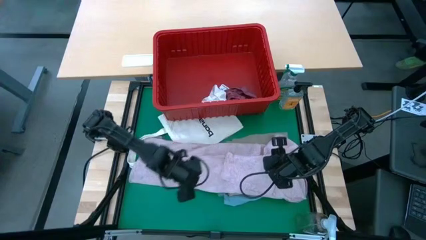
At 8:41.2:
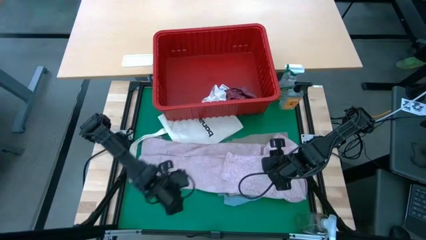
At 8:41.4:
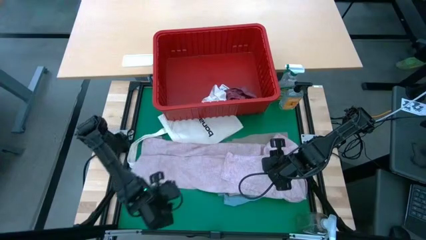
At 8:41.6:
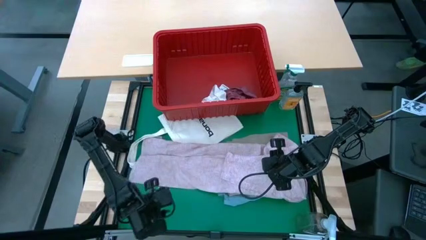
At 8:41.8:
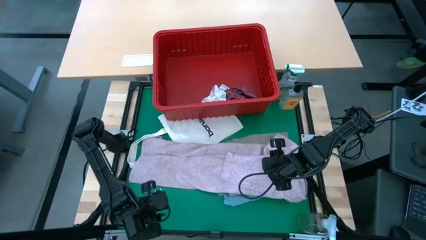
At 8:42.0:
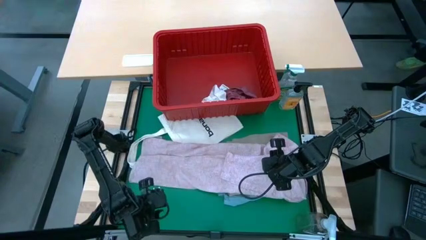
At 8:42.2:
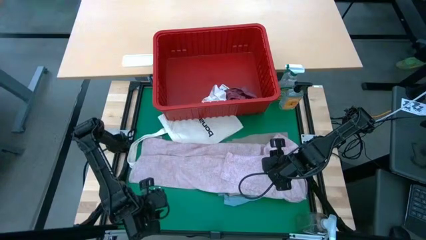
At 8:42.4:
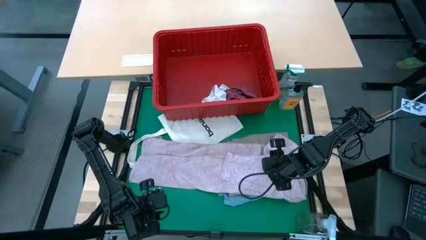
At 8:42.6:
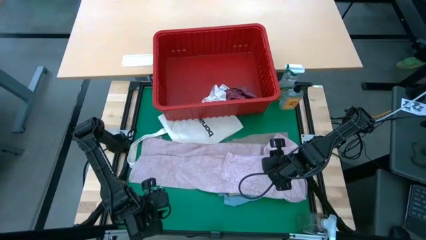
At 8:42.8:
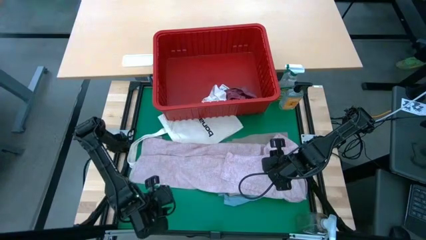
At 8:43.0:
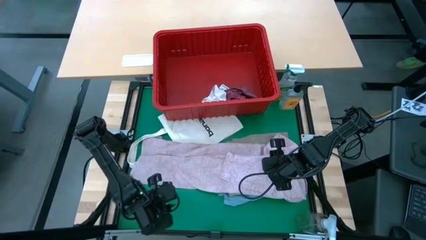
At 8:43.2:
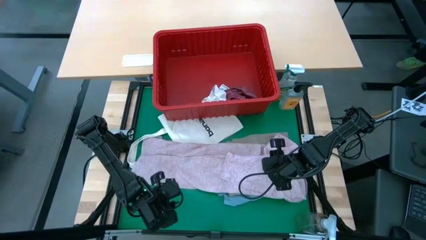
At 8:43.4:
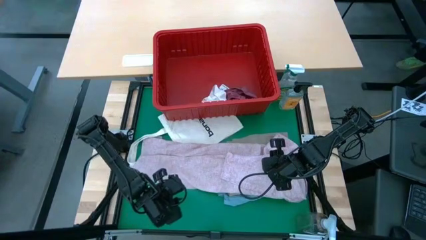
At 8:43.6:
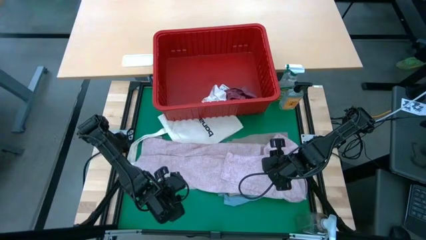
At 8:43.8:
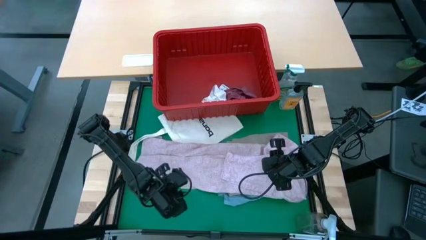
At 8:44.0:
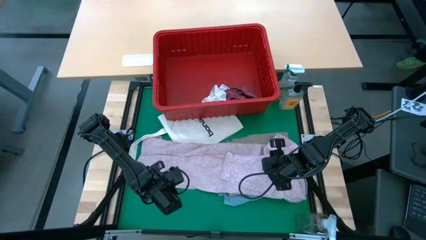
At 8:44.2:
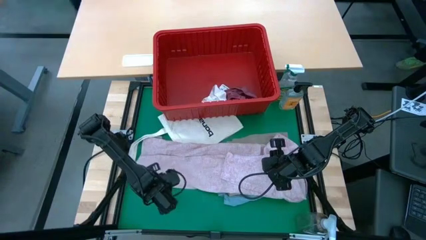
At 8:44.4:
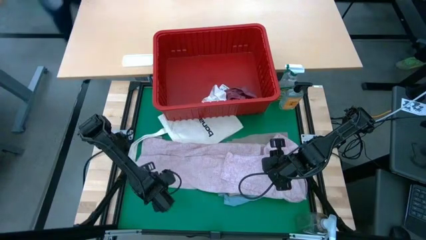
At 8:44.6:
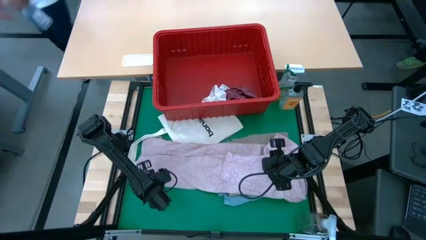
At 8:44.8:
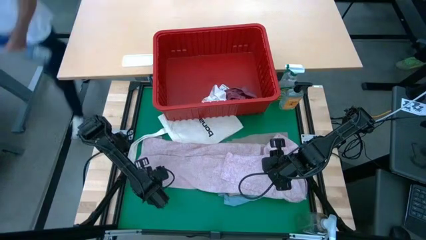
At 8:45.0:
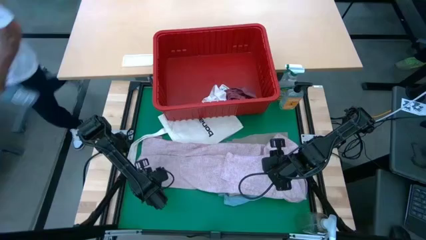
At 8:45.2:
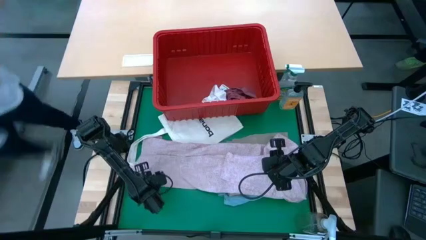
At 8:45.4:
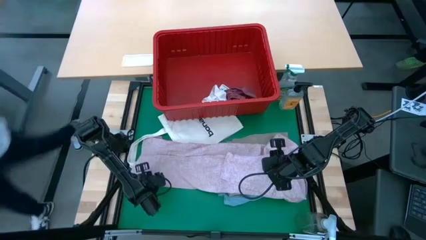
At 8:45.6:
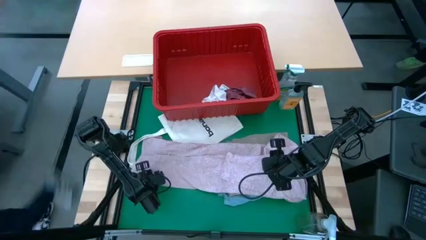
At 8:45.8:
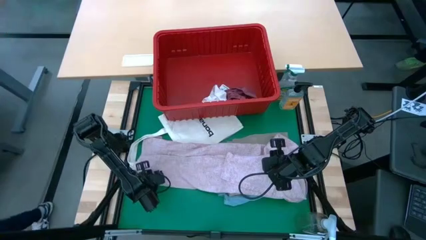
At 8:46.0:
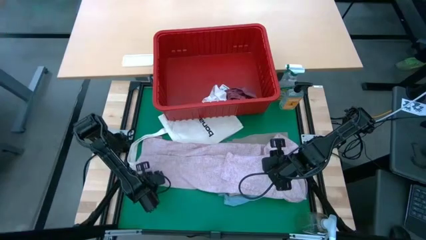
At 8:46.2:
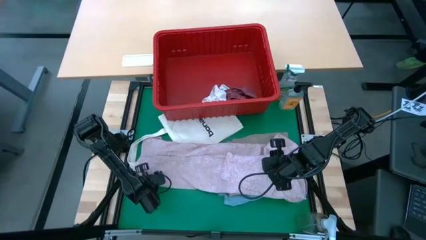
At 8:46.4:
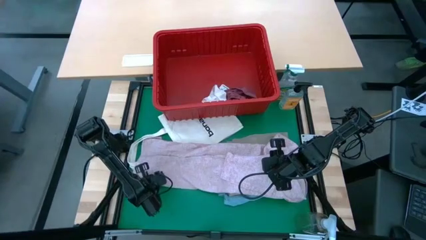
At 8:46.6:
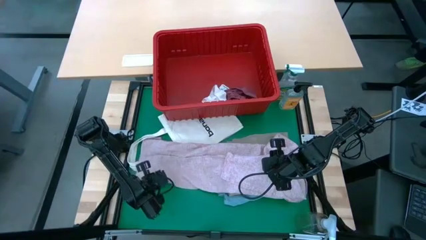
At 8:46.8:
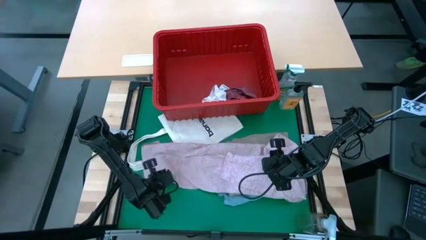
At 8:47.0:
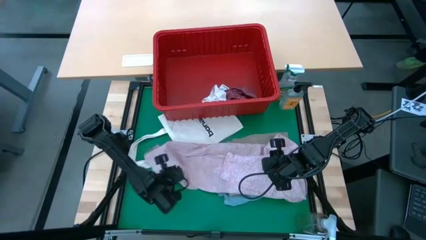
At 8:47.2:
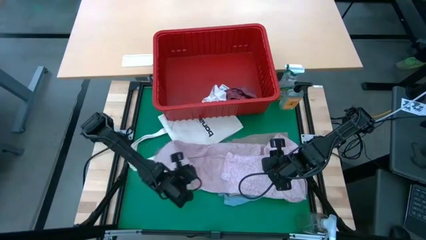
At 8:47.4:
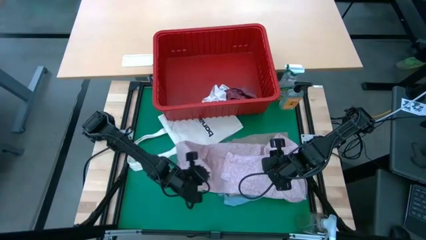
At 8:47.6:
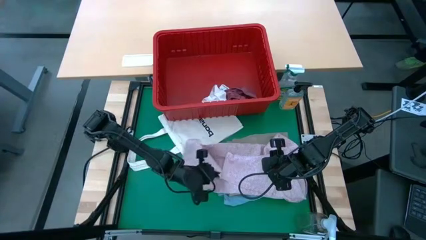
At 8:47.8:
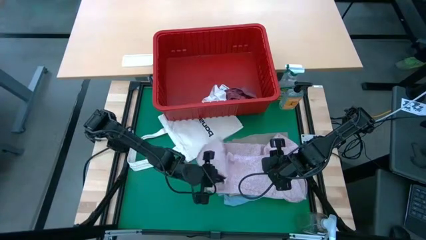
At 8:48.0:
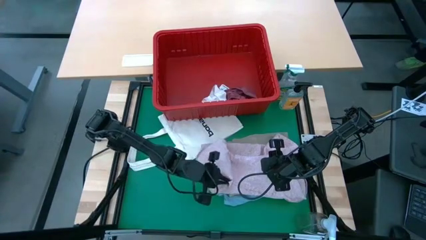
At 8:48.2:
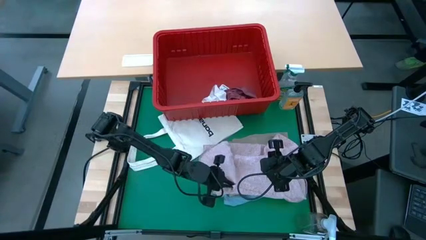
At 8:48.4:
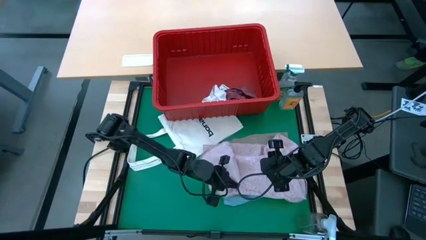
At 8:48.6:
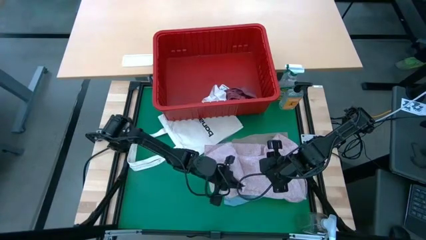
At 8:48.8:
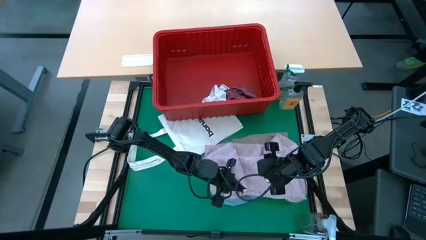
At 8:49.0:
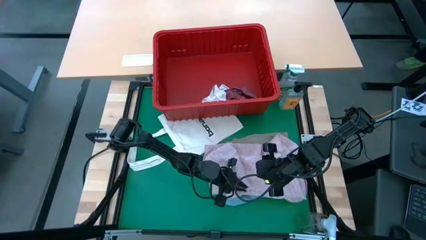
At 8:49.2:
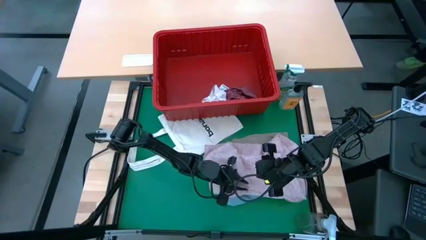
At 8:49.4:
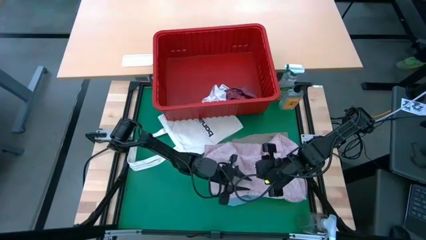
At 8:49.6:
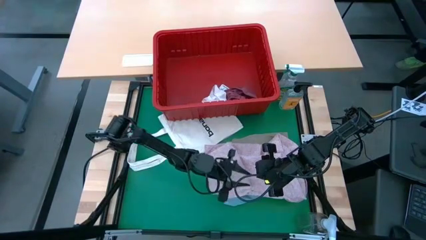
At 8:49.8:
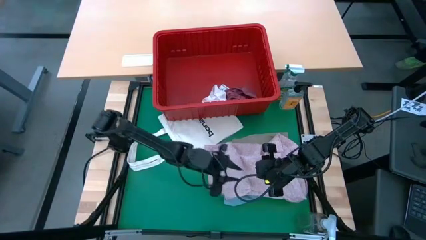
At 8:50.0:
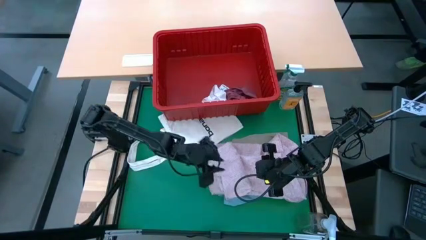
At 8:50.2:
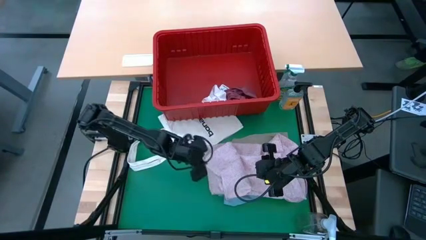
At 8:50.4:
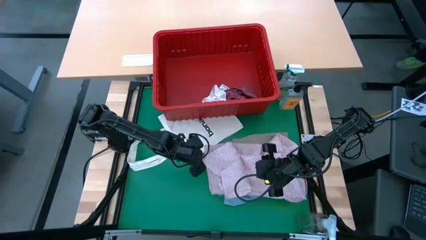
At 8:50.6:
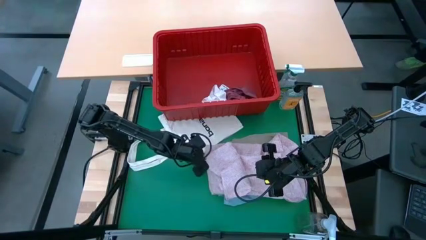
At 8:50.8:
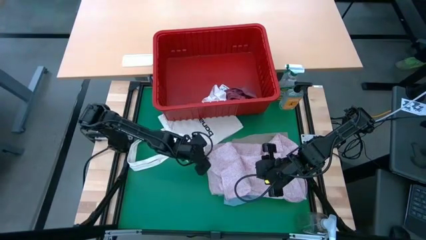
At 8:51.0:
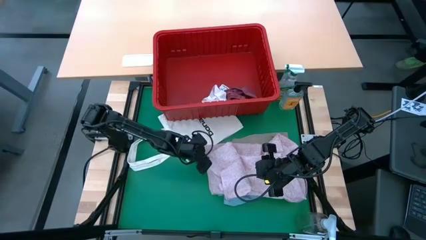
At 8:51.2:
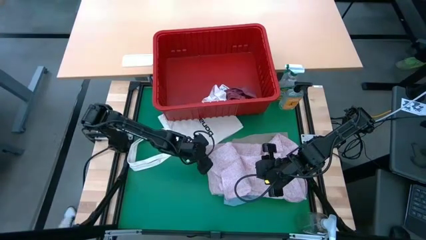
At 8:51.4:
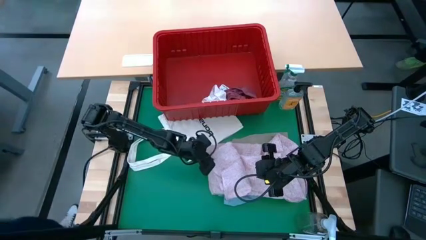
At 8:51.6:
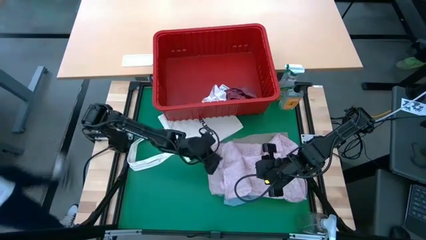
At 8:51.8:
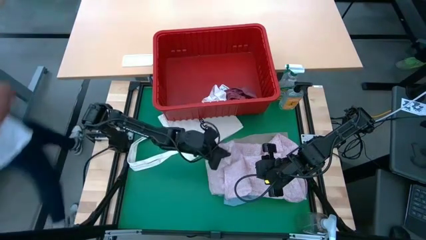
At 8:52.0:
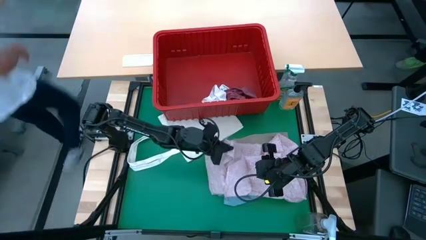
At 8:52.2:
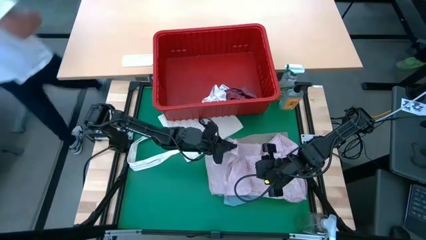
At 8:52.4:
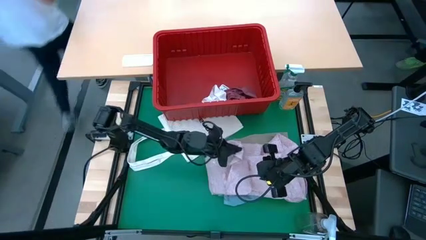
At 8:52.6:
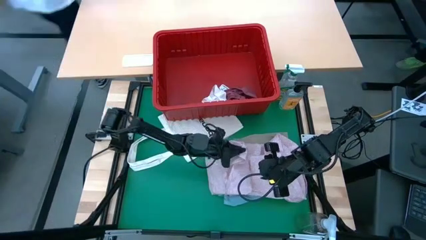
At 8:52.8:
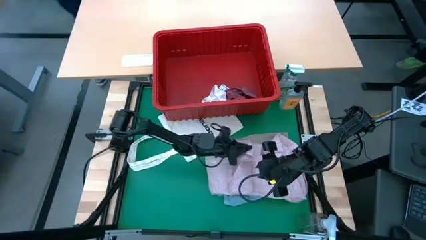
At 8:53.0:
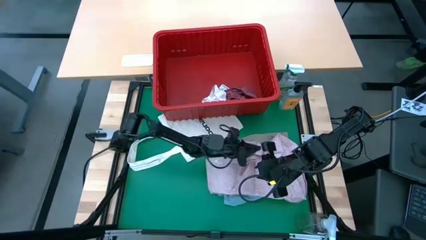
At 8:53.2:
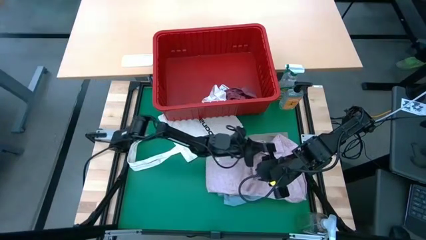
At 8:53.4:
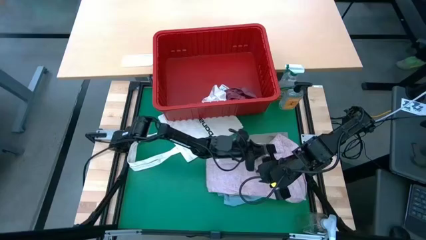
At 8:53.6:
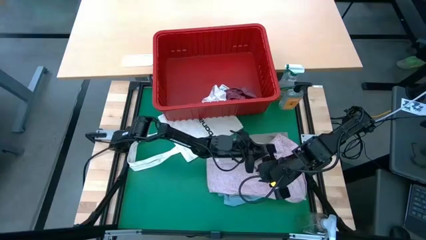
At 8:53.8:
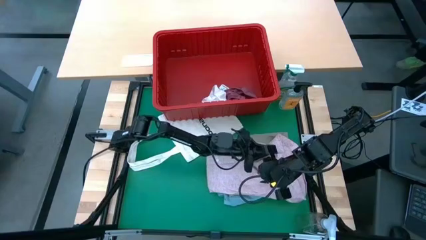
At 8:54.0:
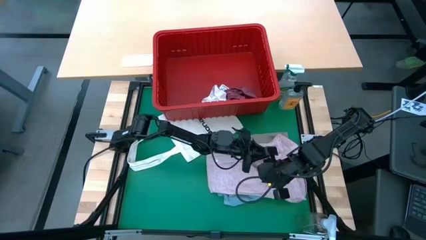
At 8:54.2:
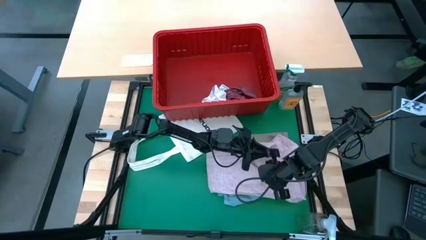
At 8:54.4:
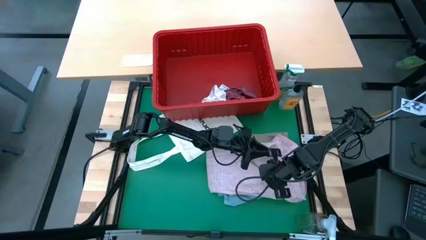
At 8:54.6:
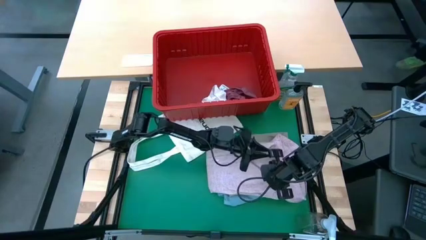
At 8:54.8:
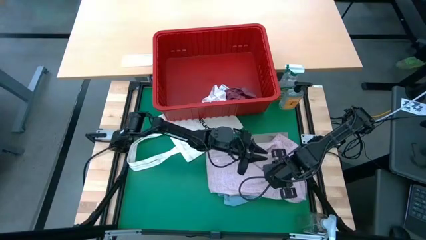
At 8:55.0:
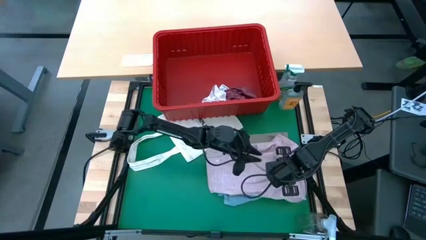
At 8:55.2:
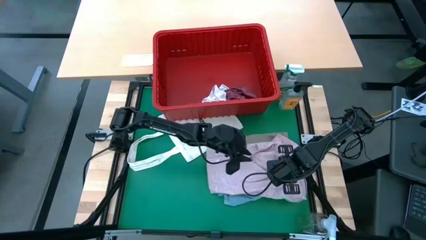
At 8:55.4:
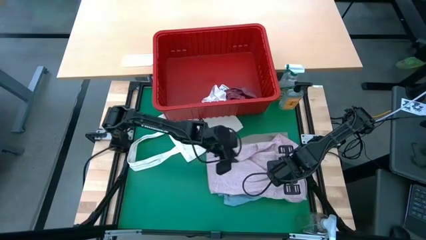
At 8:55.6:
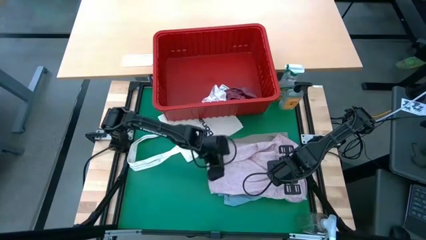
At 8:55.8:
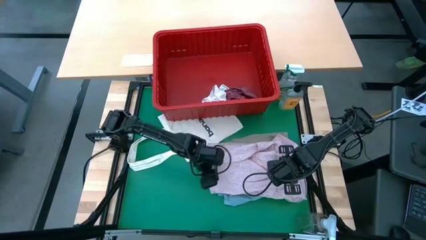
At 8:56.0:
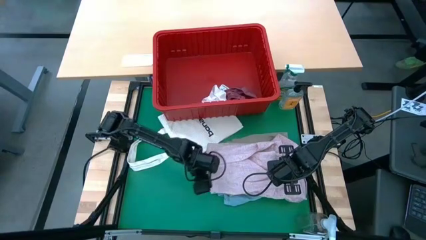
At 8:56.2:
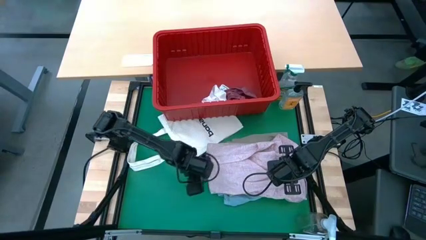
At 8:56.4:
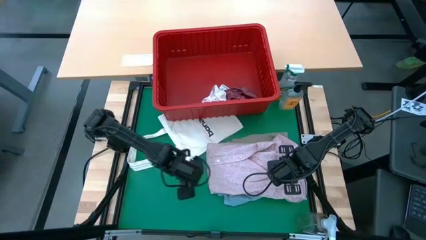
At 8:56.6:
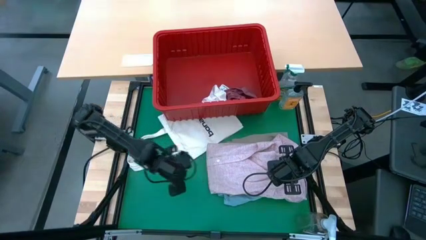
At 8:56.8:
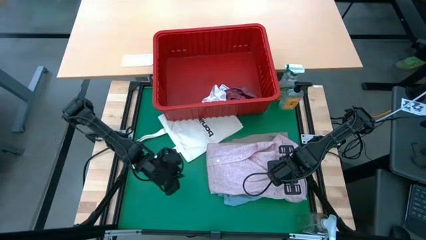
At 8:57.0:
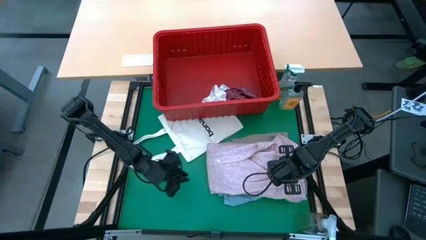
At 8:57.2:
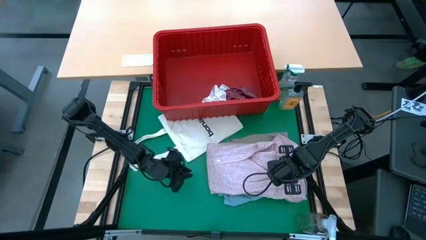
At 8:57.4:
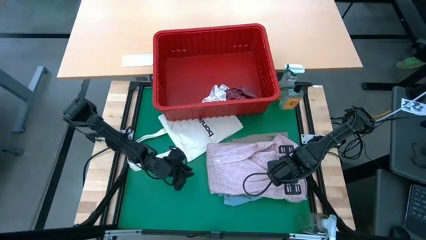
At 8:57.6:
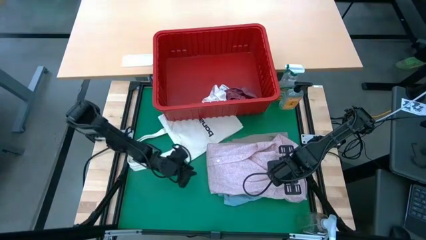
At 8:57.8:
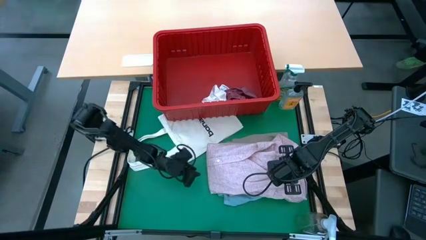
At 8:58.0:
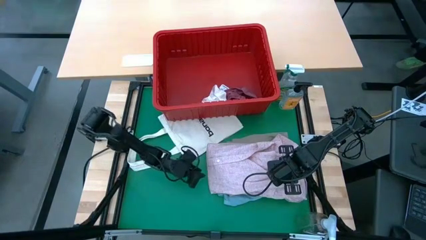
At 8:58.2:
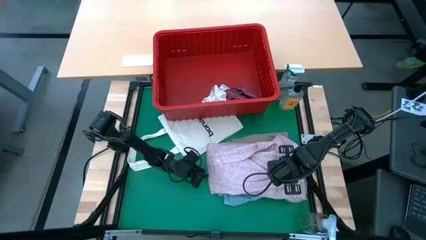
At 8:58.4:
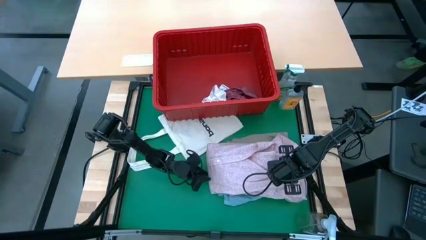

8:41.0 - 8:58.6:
Task: Fold laundry
Fold the pink shirt
